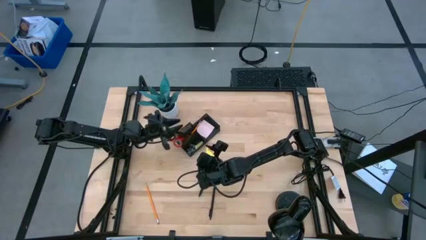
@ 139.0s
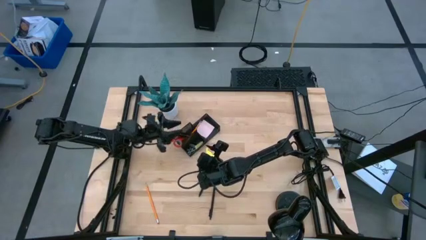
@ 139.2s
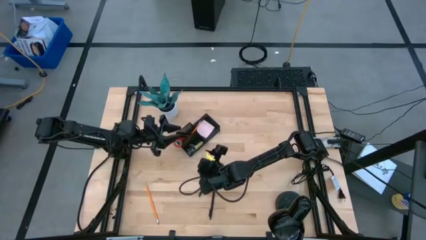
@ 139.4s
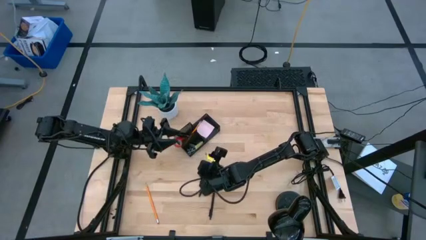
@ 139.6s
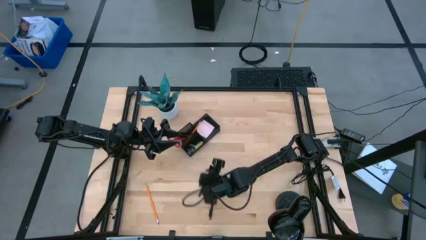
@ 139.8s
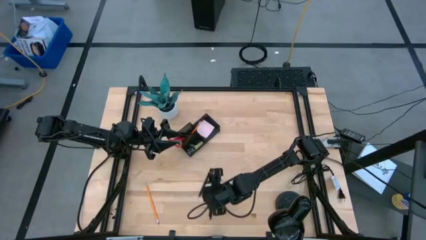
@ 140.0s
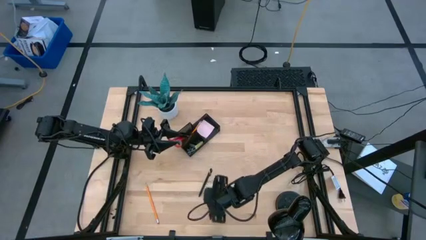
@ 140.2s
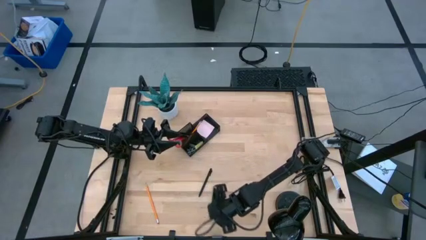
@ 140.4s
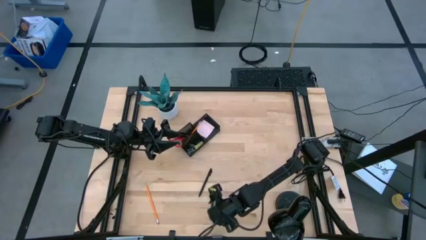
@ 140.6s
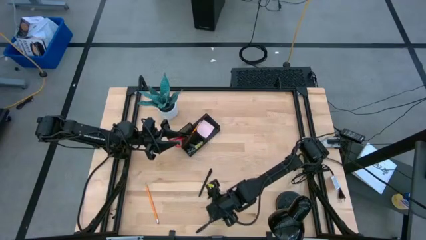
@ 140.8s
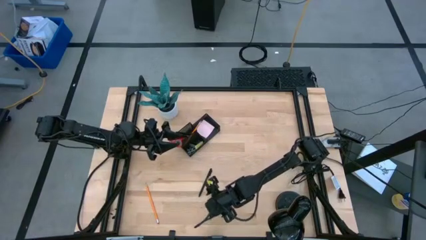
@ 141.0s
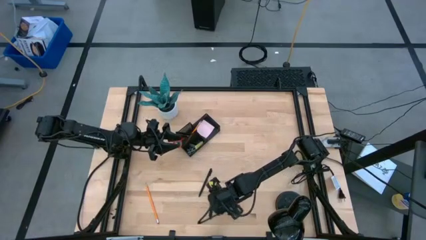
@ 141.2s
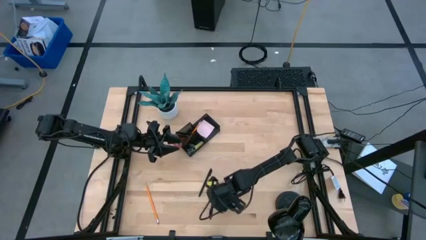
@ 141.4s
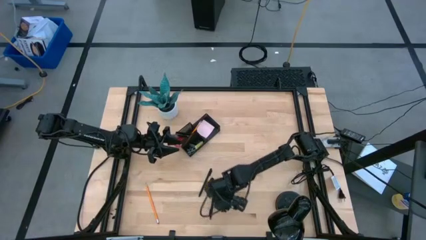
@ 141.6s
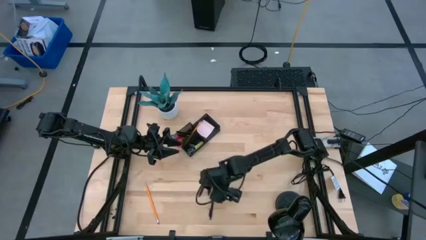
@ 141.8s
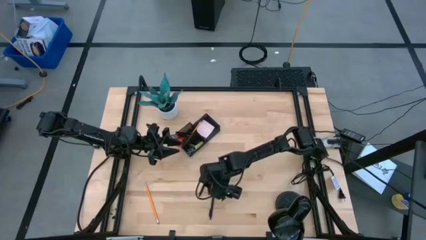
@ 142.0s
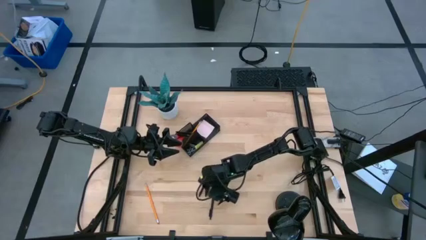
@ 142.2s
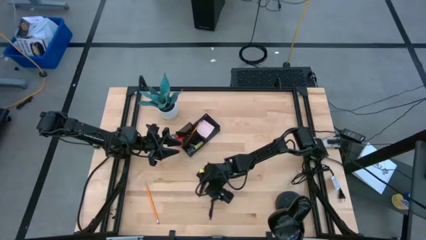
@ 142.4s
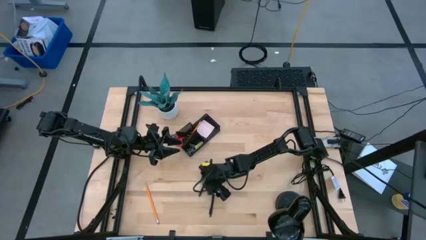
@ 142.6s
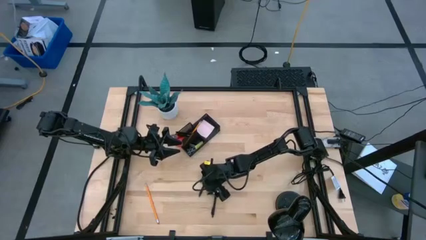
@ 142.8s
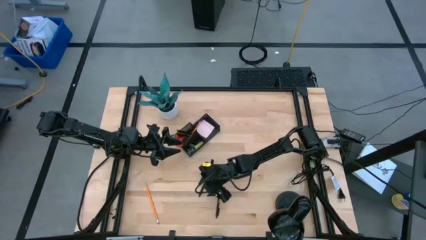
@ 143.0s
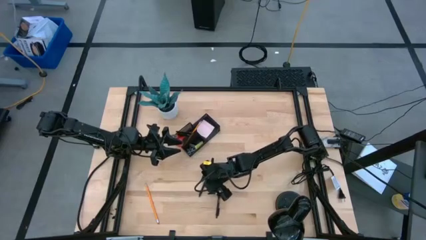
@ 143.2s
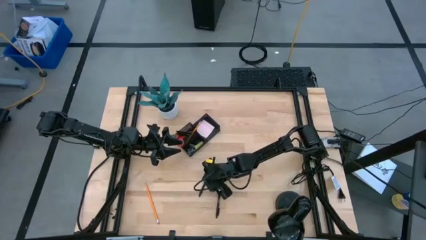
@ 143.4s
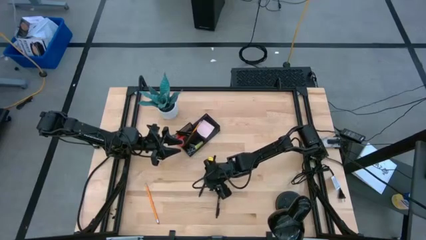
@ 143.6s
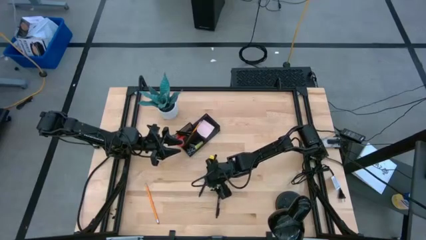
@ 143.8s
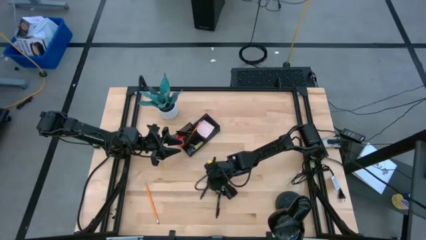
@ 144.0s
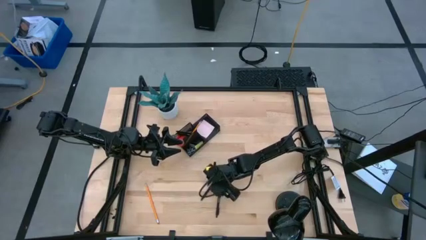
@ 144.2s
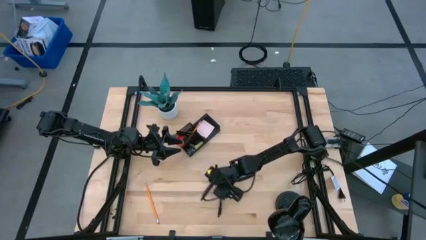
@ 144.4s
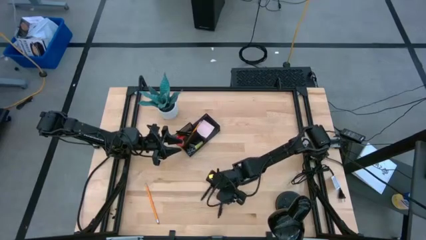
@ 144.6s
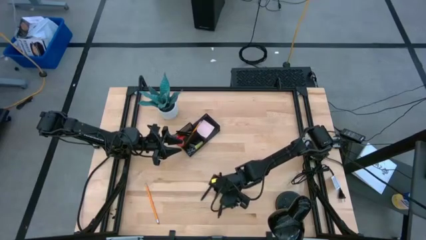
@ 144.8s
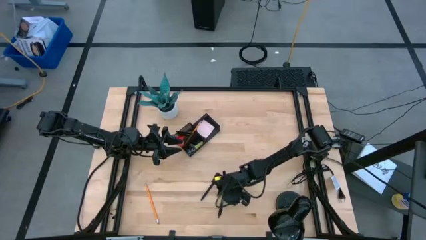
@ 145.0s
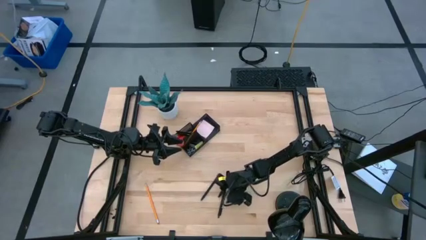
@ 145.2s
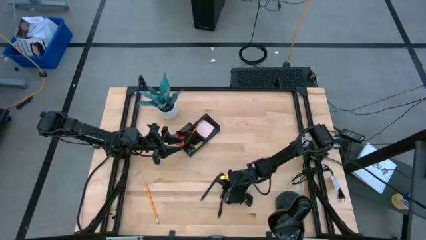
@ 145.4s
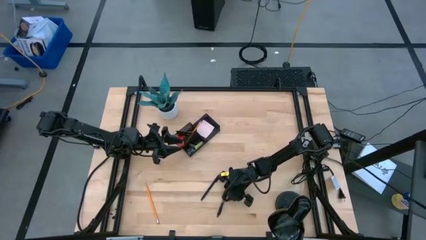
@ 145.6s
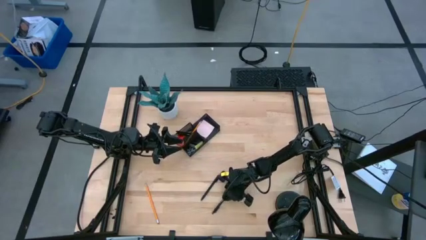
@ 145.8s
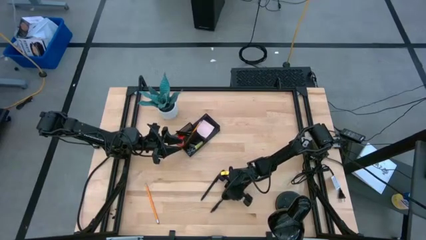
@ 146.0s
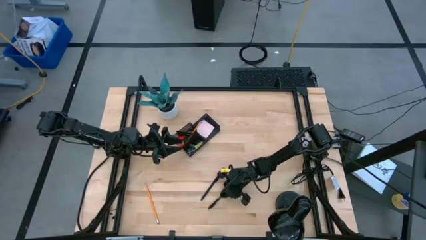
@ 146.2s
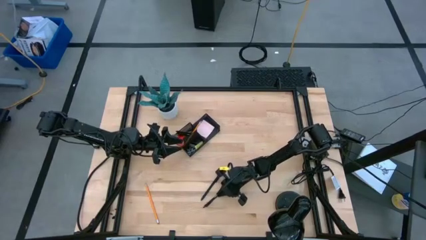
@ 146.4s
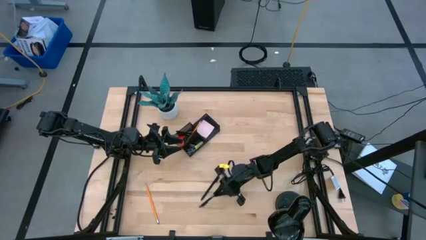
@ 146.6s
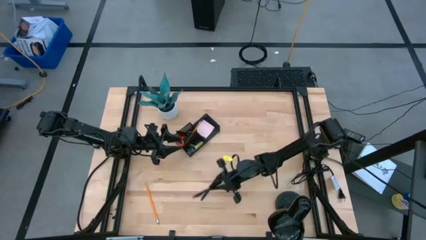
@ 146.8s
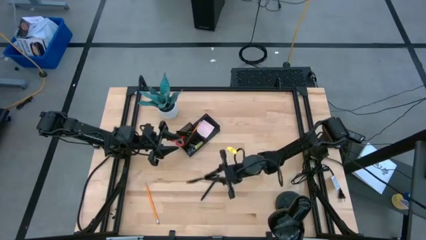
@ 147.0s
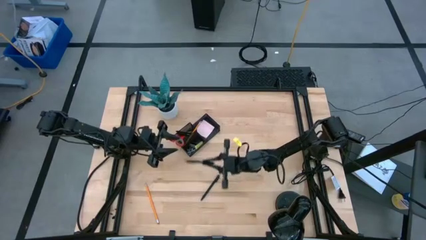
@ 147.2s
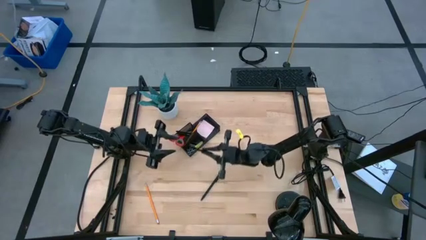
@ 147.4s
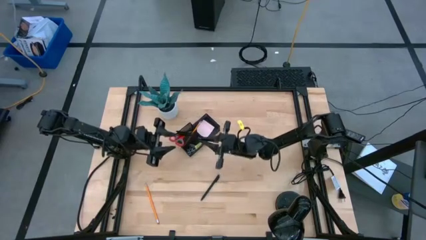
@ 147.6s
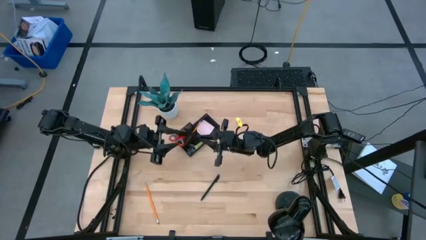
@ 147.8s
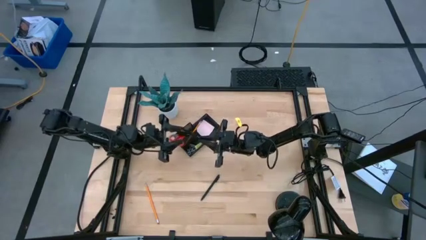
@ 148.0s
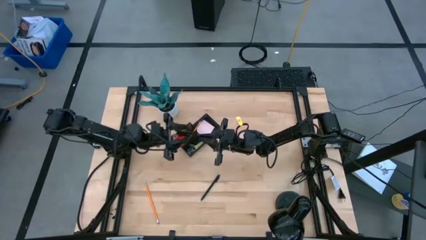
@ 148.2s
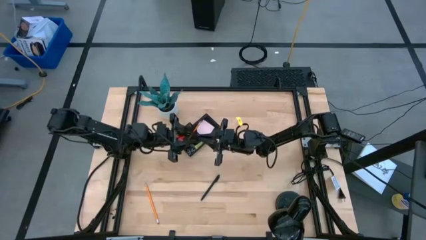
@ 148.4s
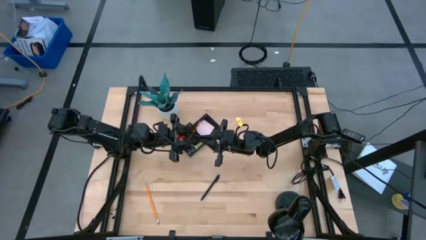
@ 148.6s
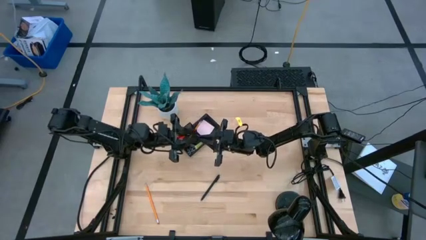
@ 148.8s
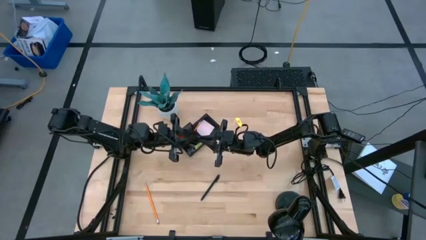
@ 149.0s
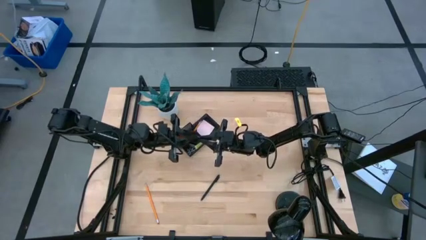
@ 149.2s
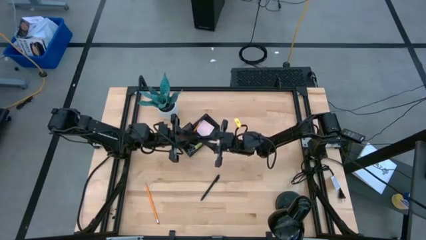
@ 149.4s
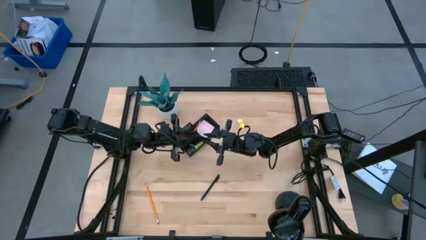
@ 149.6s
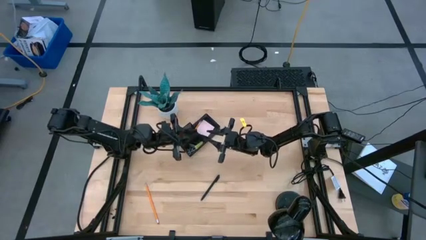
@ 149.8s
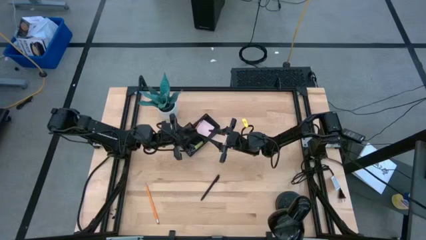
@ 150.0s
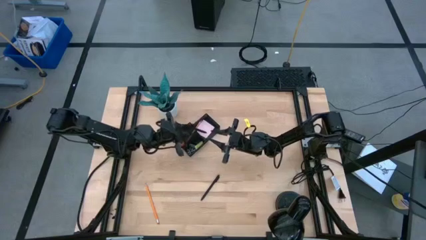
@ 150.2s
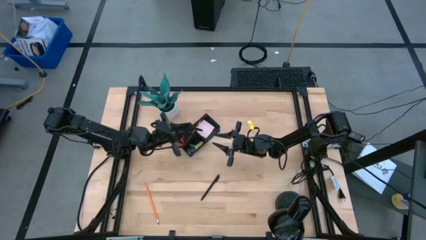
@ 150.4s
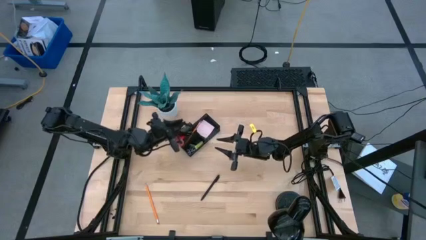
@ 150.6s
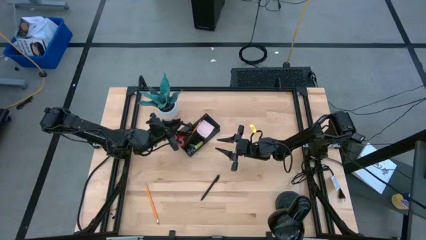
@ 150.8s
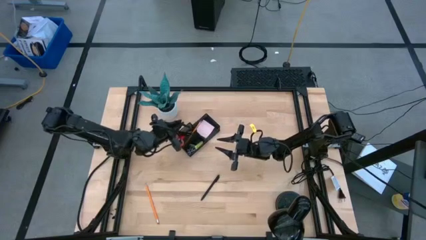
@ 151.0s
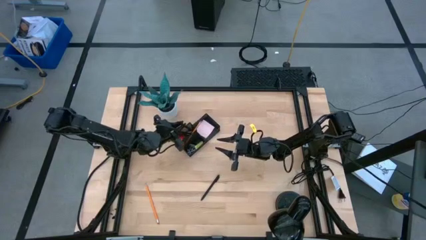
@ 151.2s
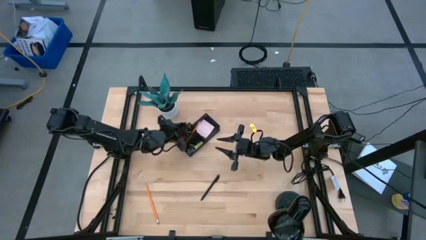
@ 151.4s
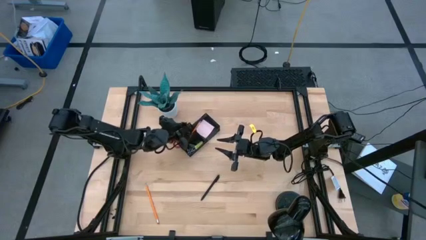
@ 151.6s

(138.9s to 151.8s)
Task: Pick and place office supplies into organizer
Put the black pen into the black desk organizer

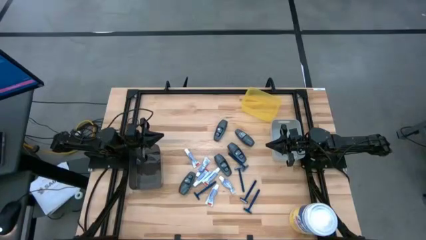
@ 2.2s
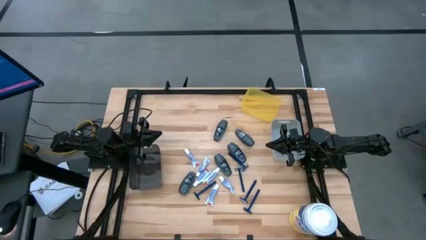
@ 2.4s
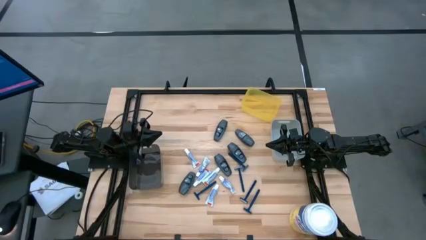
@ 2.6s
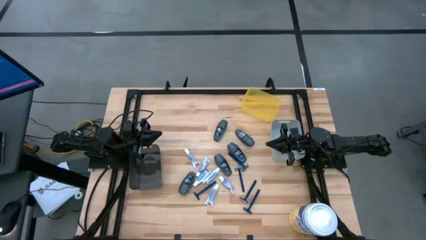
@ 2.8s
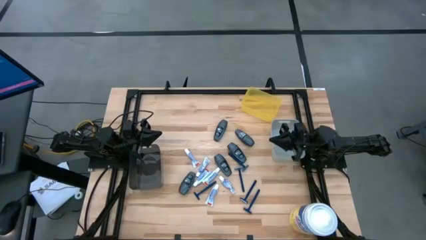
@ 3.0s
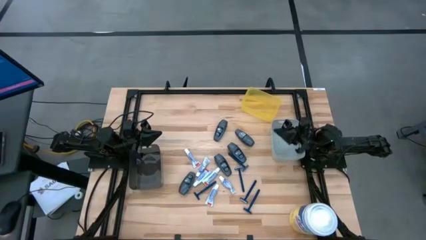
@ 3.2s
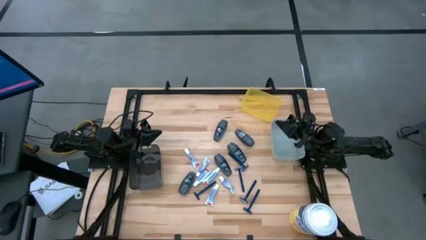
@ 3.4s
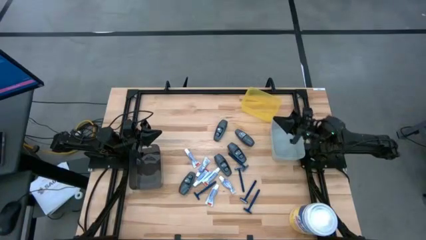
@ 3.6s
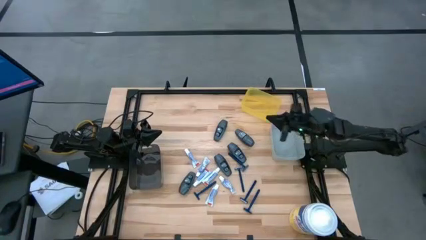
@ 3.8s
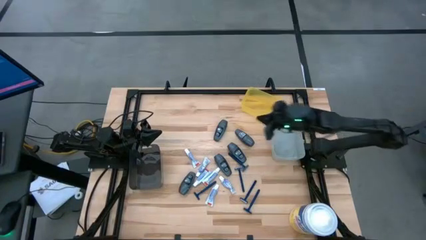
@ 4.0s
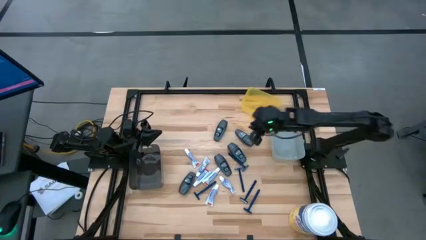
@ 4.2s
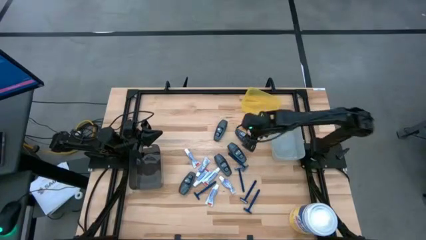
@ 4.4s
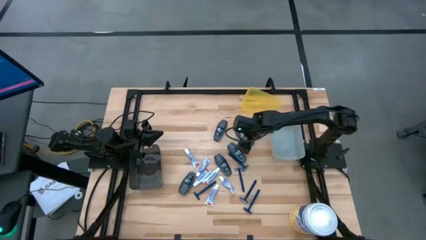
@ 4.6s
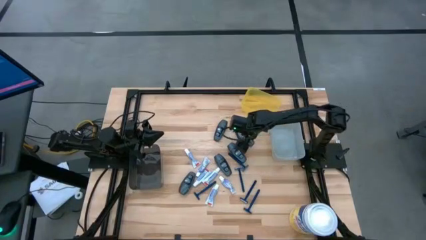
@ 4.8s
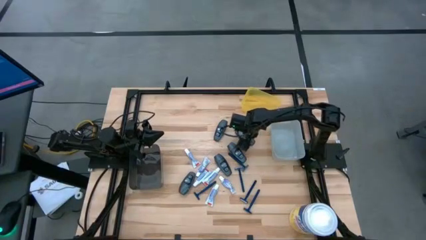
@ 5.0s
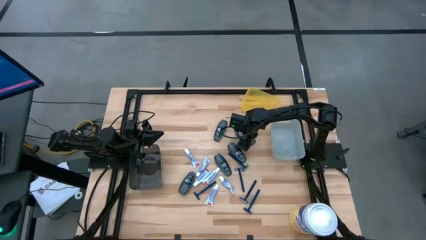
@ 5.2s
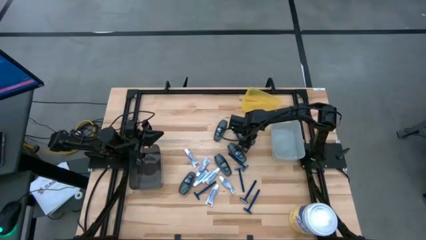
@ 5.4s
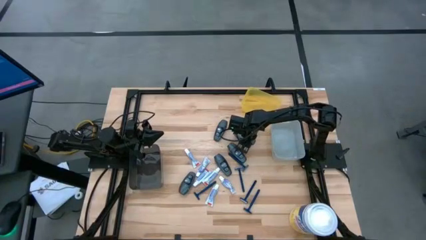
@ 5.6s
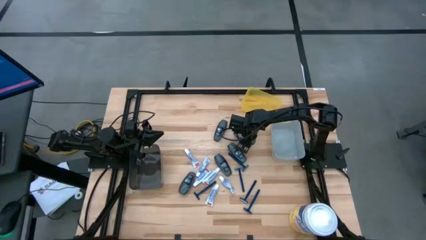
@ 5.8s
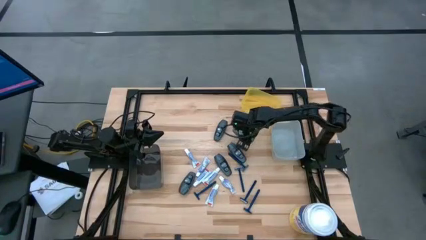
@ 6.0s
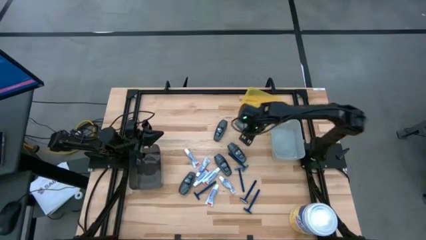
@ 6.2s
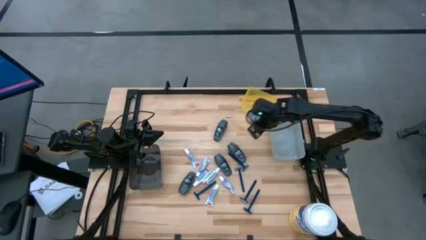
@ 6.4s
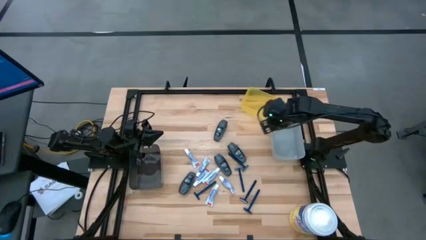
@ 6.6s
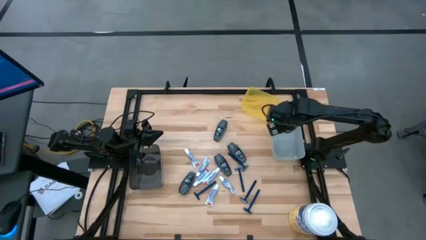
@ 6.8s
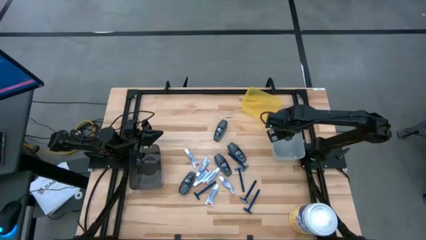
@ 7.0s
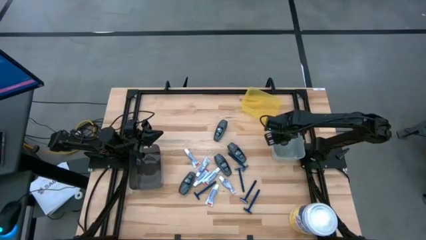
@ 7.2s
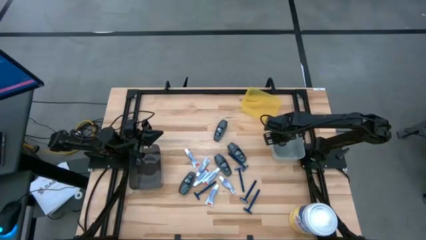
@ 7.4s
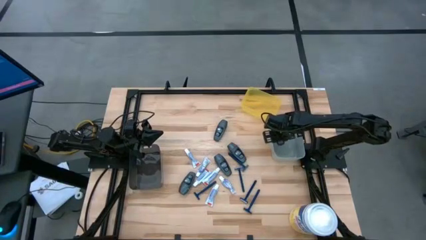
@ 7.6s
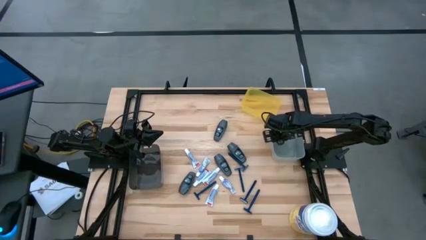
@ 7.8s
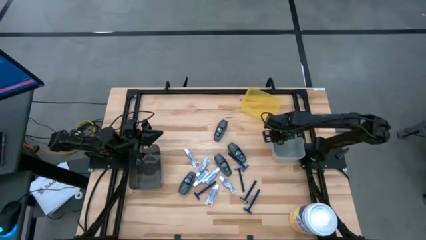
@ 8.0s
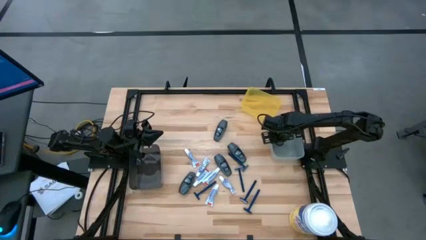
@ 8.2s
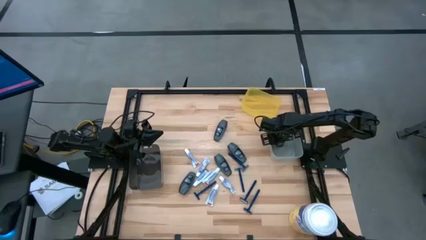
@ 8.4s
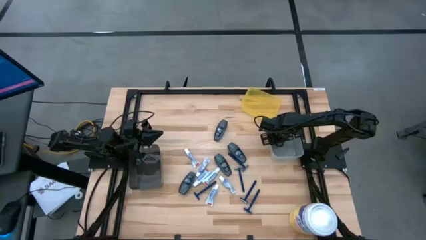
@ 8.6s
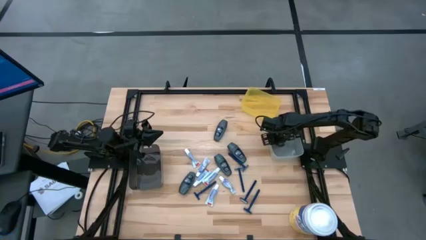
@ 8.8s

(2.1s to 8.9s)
Task: Pick & Place Travel size toiletries
Put the gray deodorant bottle into the white bin
